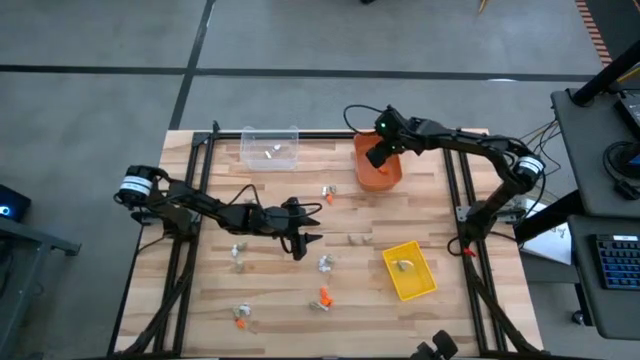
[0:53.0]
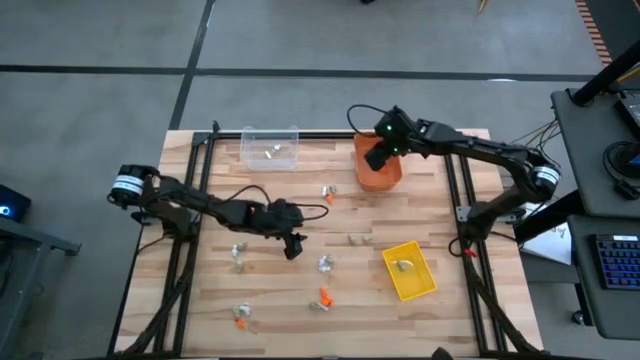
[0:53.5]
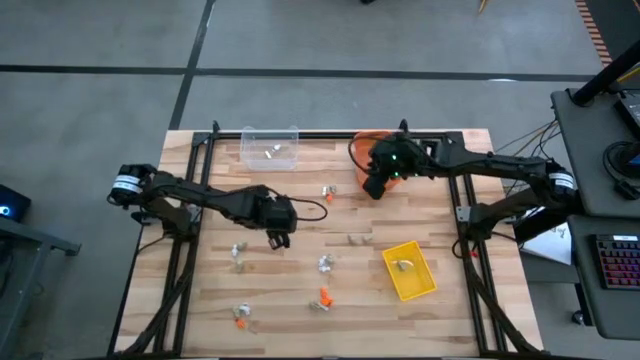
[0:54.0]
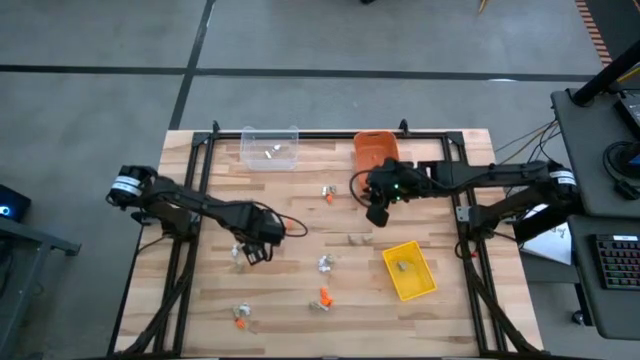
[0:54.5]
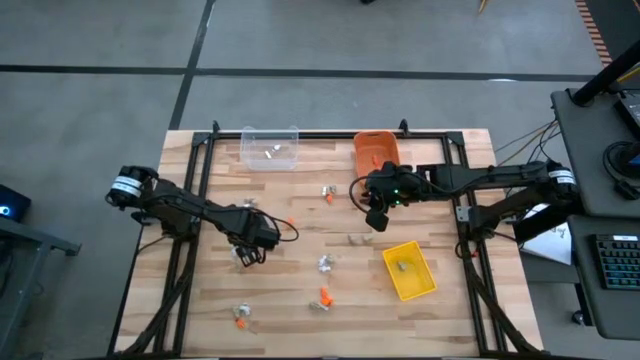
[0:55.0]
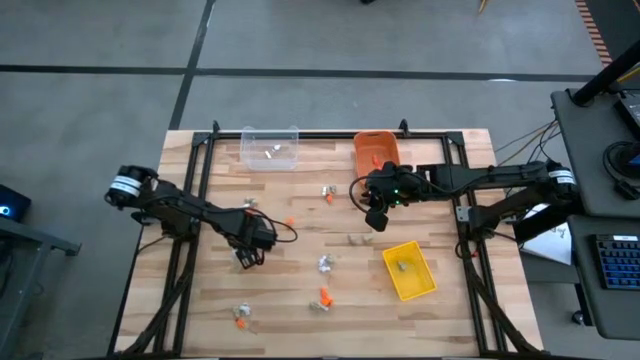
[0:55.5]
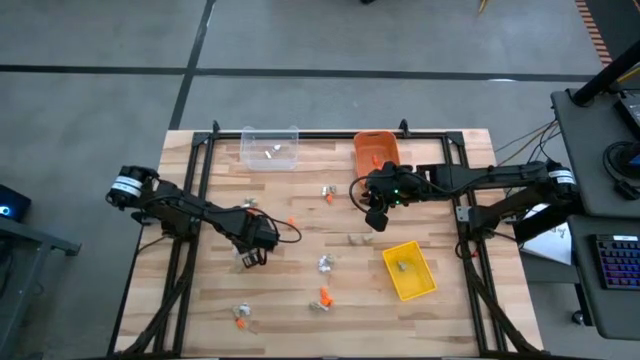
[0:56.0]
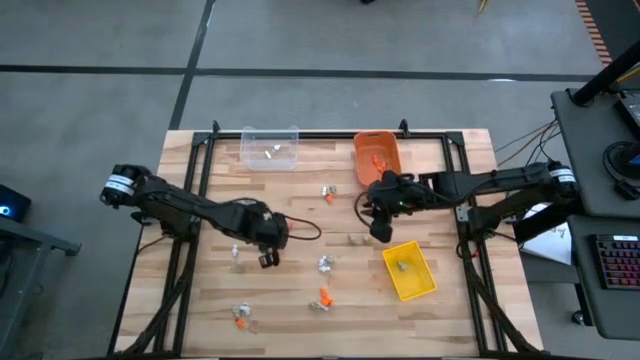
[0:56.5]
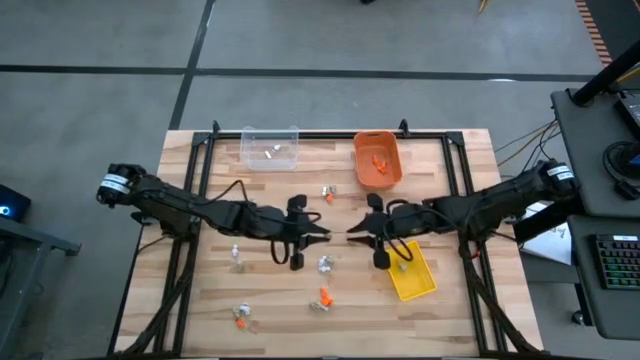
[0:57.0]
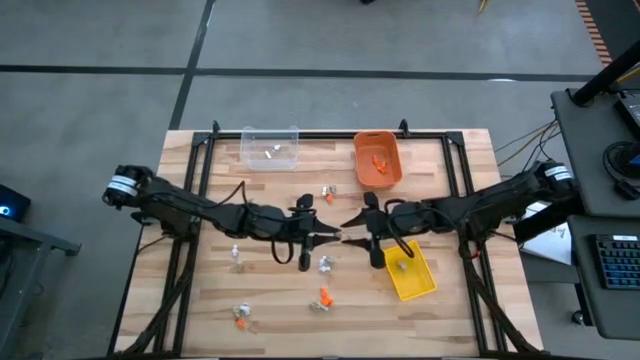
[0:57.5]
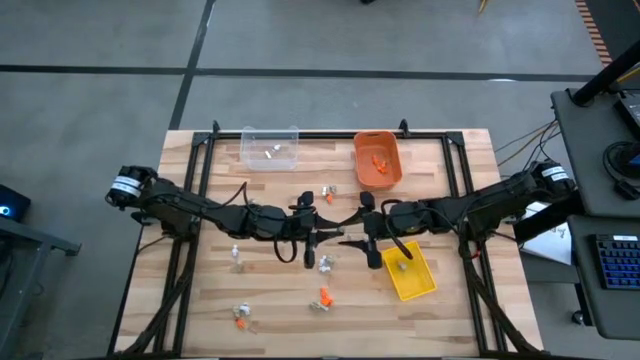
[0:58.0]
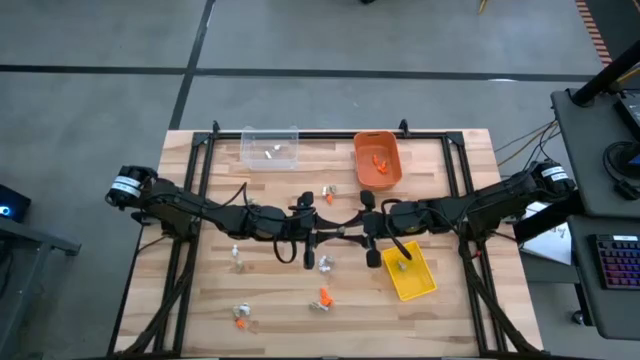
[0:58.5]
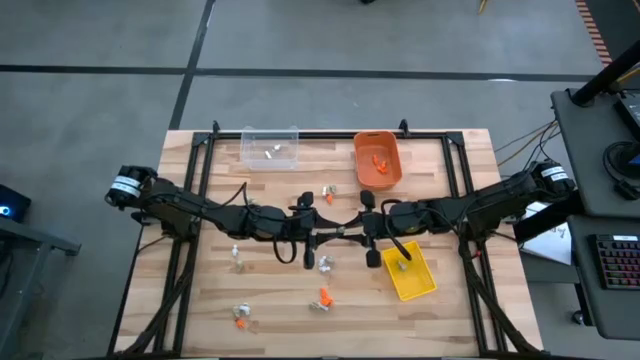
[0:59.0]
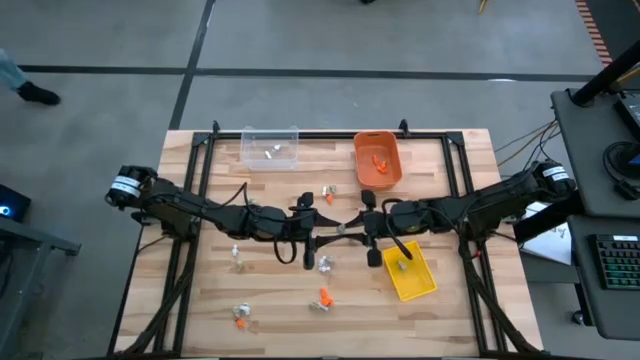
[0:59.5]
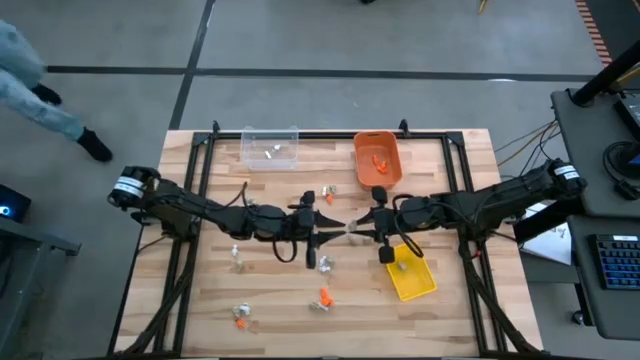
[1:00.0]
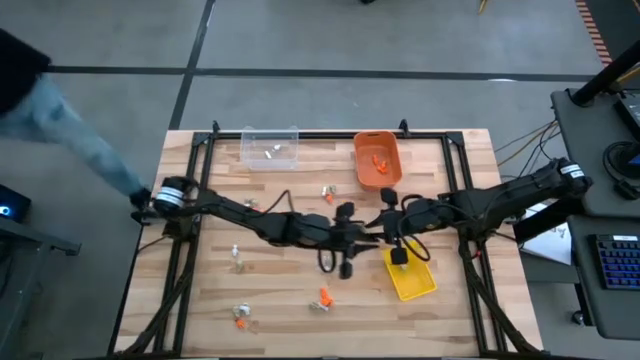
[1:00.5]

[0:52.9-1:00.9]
Task: Sort Halloween decoration
Put the gray skull toy into the yellow bin

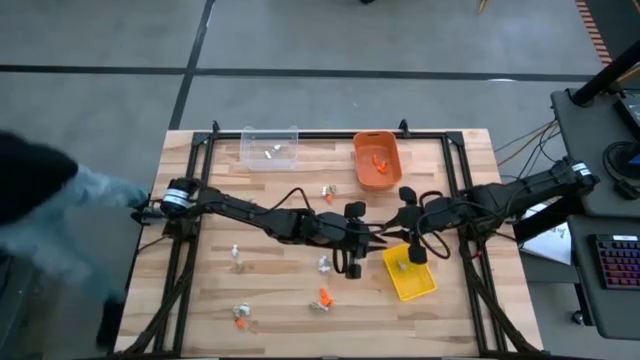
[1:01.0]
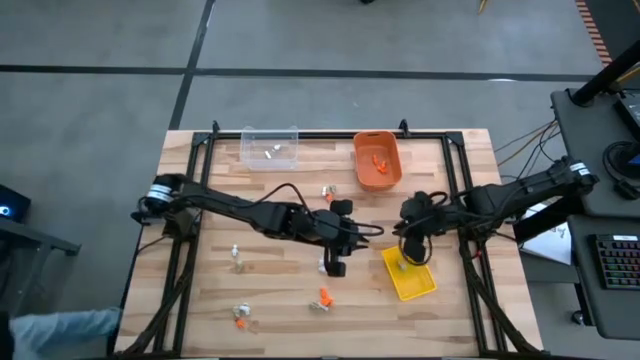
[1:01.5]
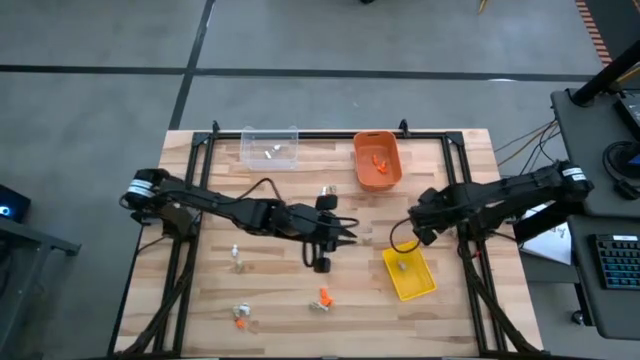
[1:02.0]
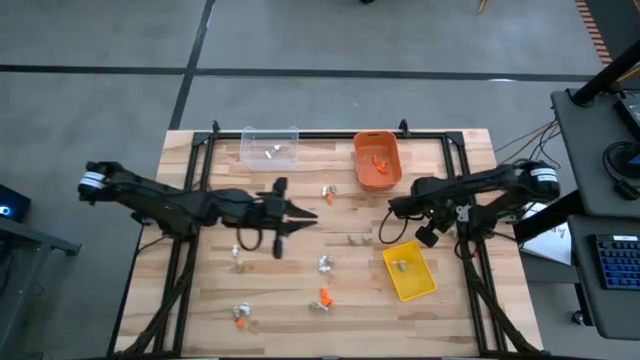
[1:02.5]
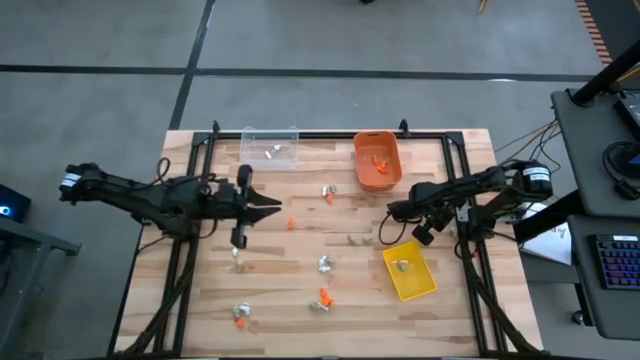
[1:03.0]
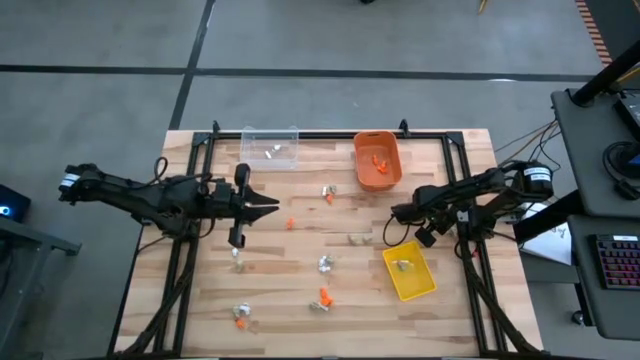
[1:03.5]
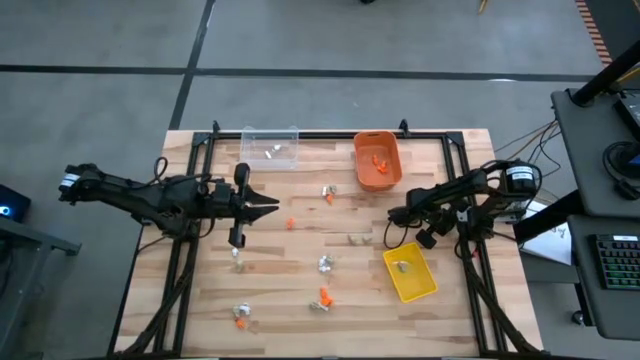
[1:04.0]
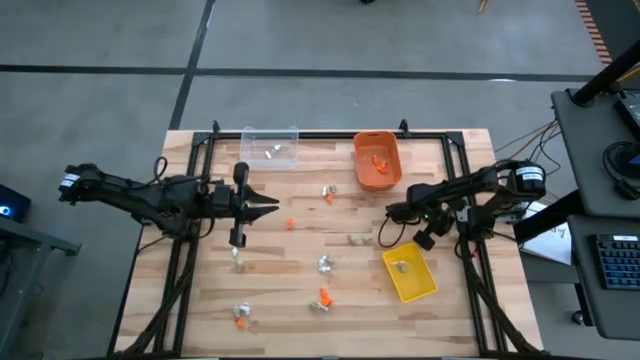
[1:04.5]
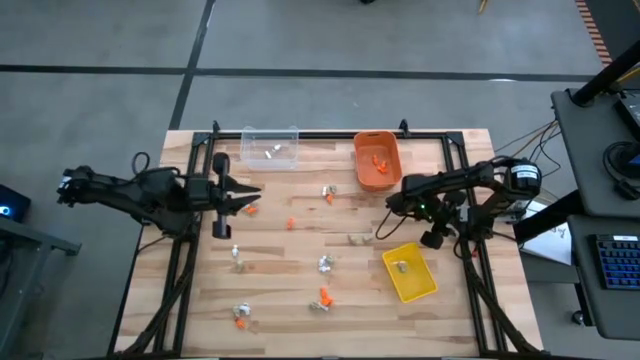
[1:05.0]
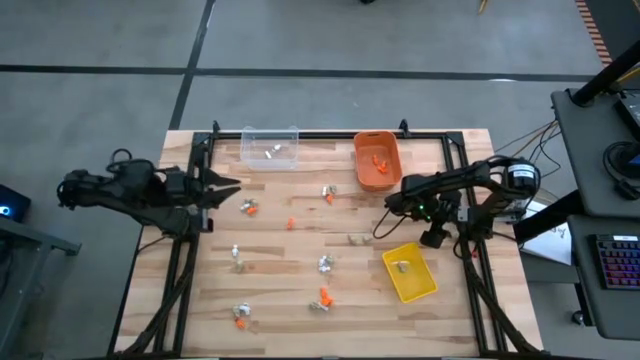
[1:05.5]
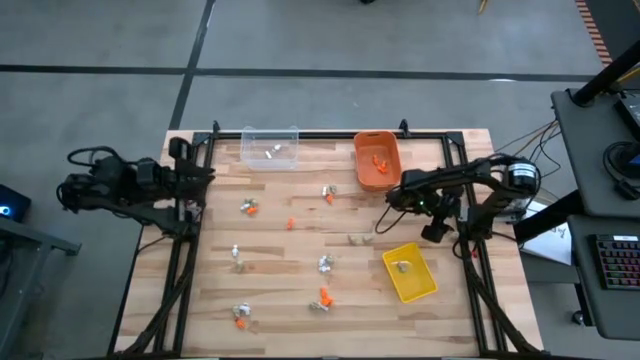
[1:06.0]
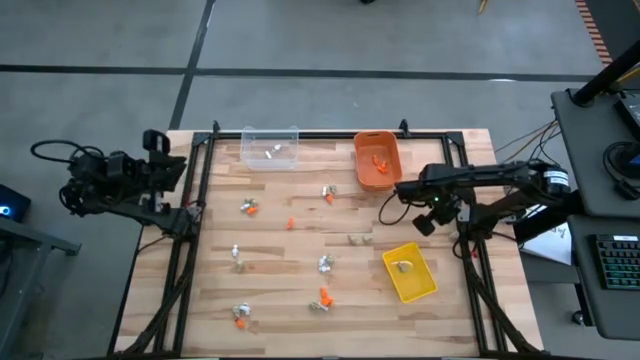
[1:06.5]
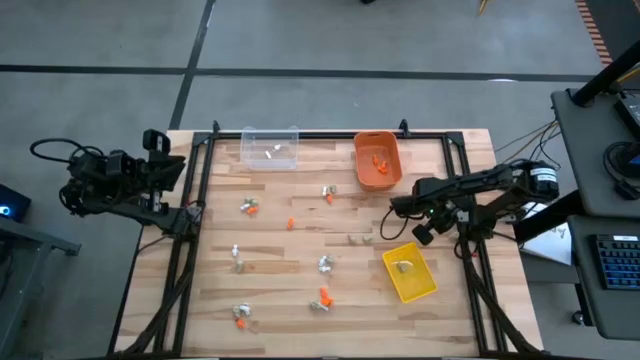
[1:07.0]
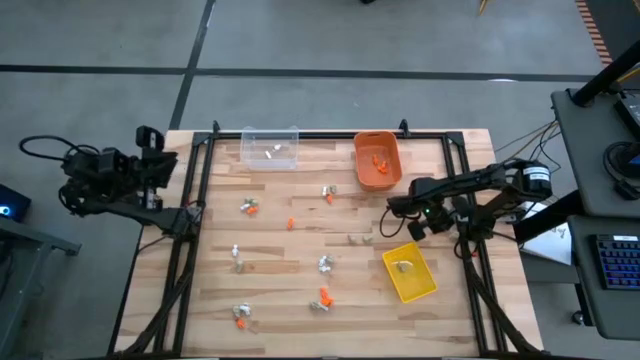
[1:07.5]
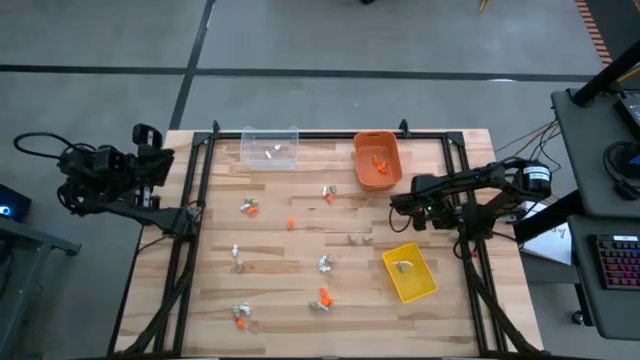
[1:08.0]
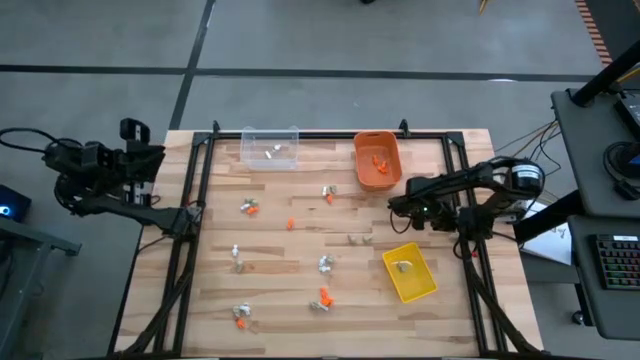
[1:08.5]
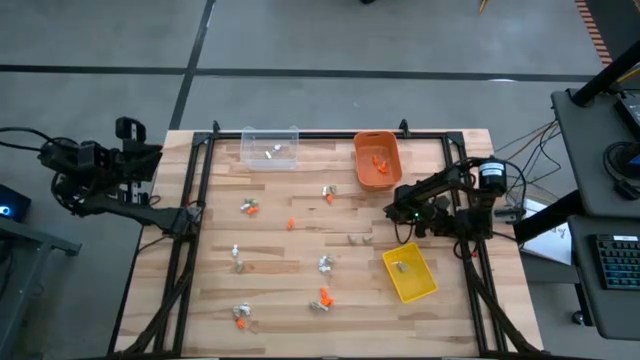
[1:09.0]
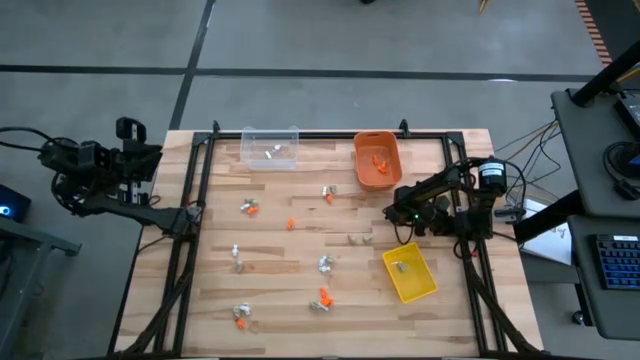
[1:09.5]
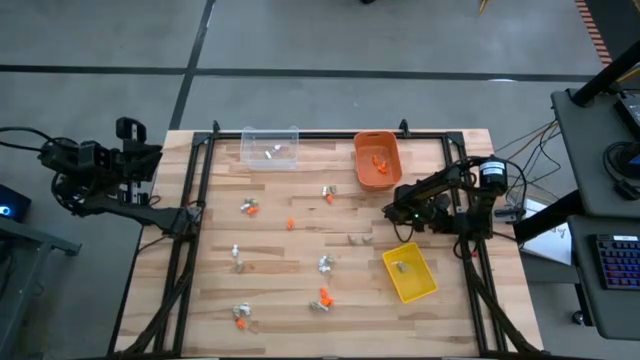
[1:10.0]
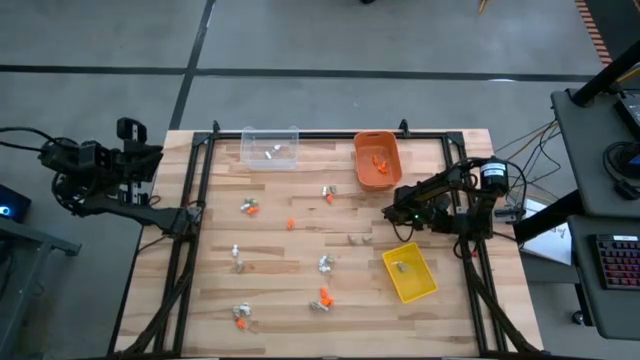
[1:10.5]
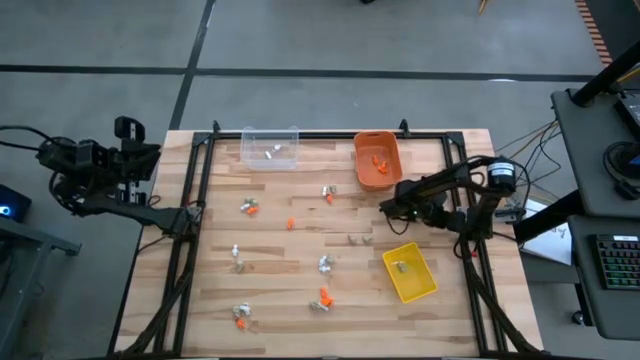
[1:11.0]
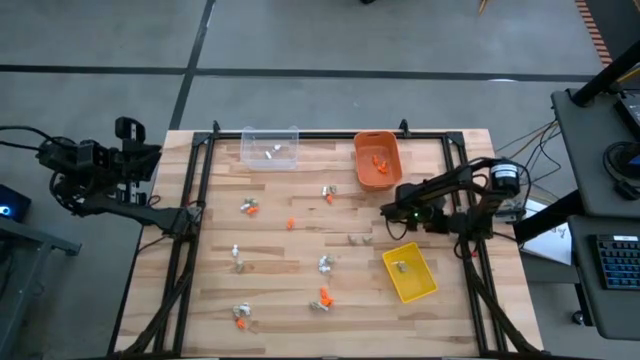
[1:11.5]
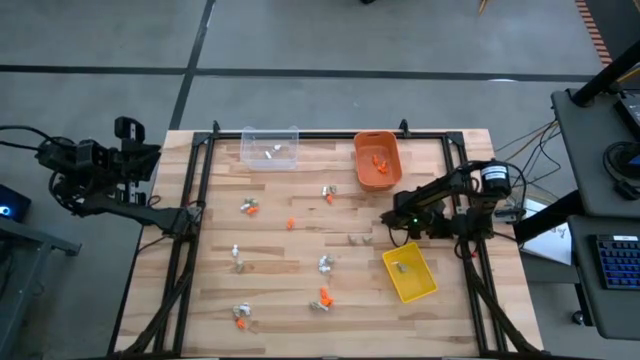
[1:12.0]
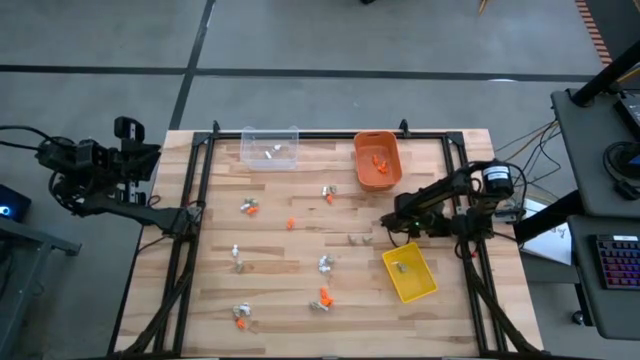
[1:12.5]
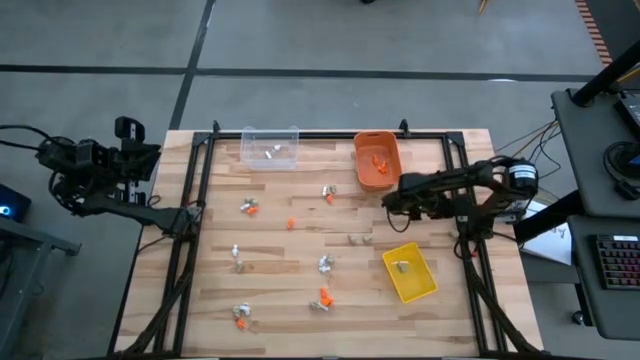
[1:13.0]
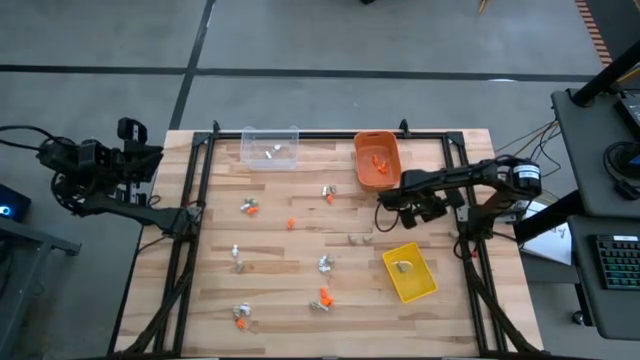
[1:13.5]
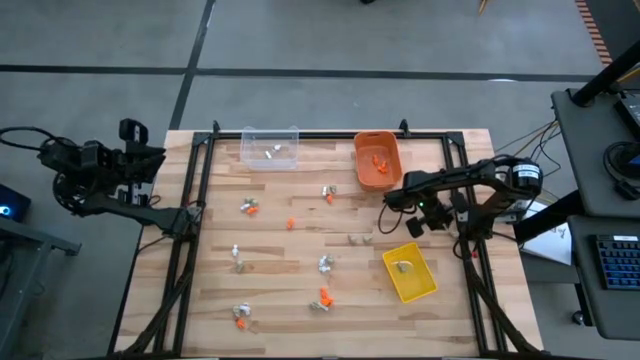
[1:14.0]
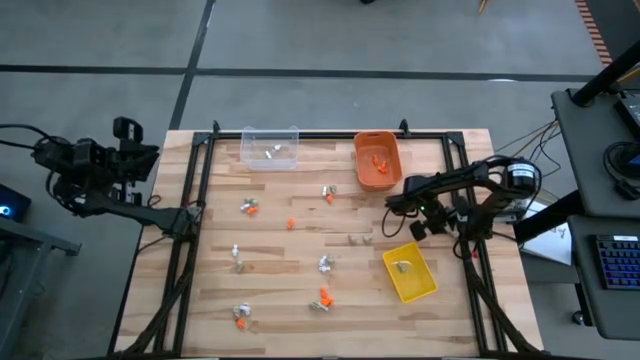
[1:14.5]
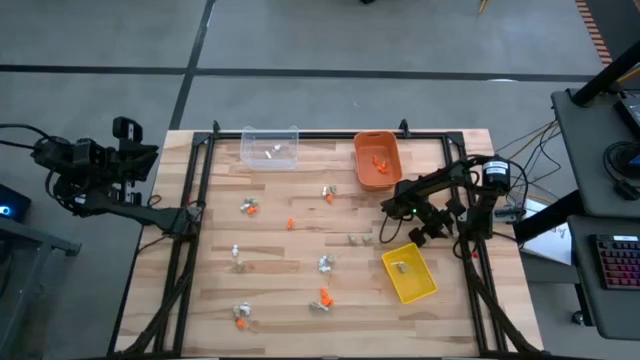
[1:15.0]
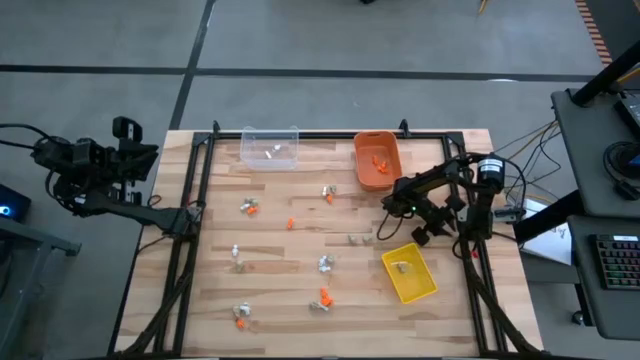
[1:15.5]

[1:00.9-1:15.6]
Put the gray skull toy into the yellow bin
